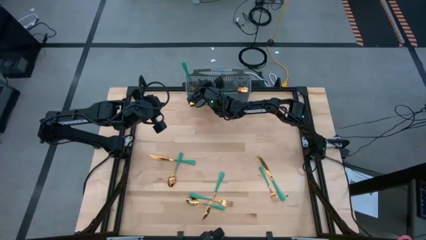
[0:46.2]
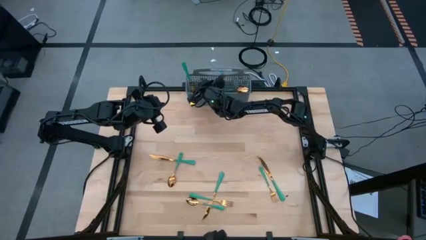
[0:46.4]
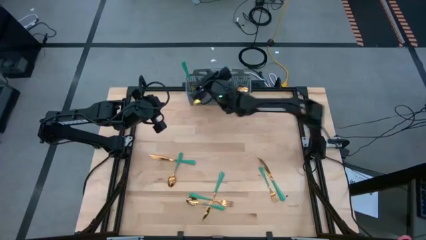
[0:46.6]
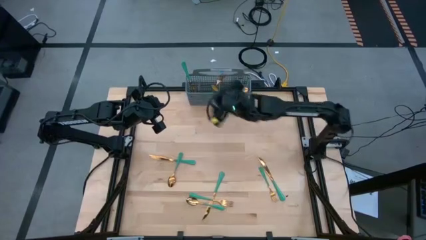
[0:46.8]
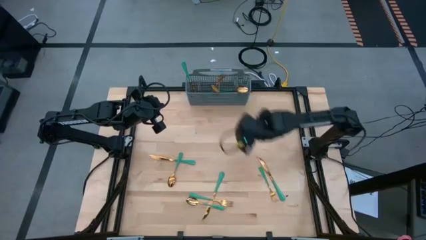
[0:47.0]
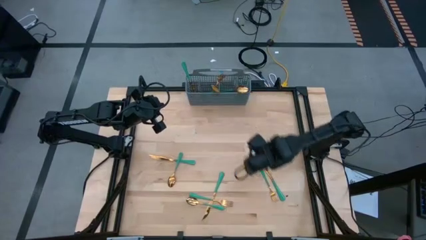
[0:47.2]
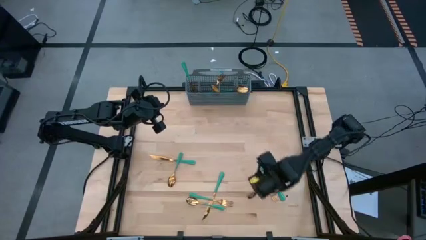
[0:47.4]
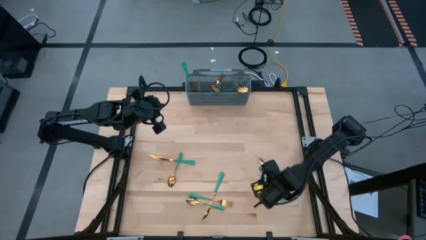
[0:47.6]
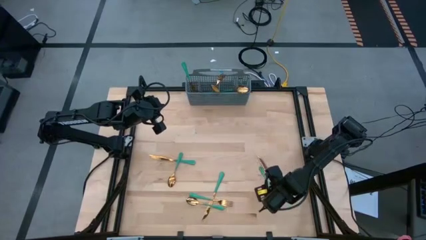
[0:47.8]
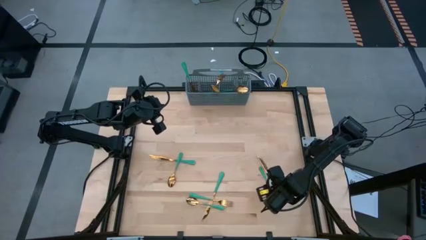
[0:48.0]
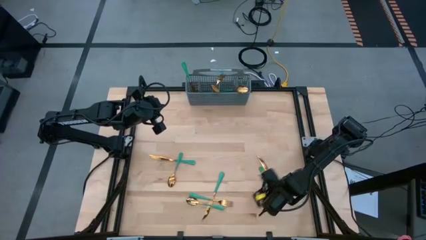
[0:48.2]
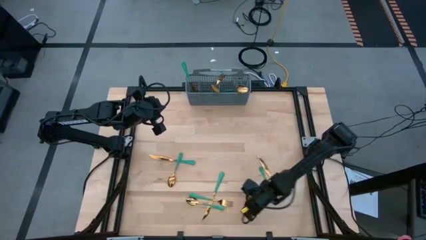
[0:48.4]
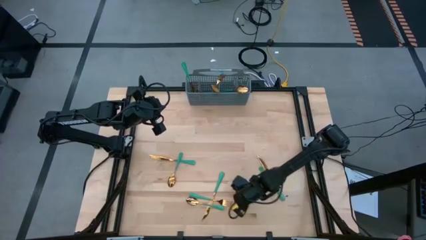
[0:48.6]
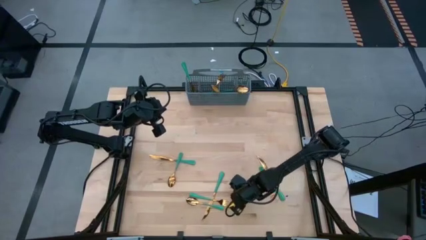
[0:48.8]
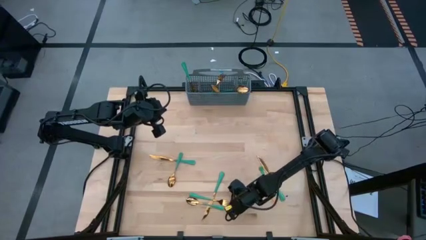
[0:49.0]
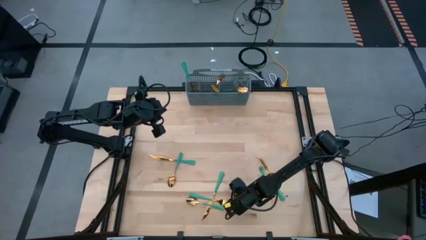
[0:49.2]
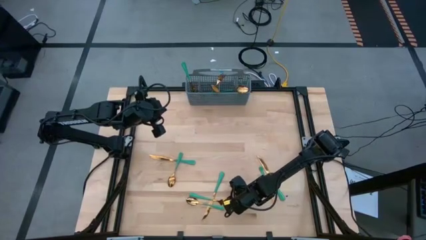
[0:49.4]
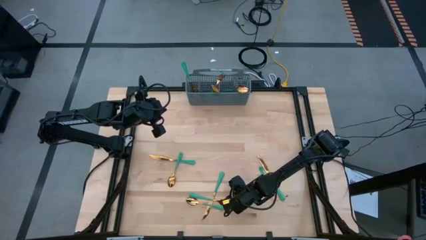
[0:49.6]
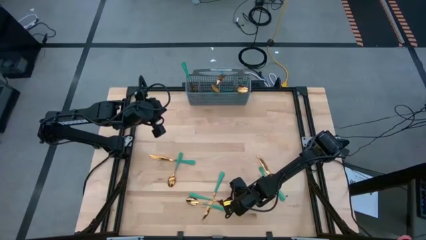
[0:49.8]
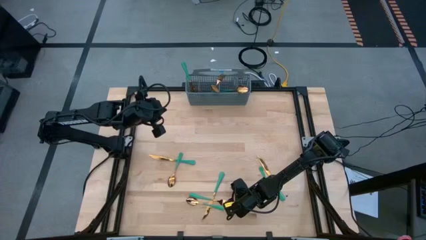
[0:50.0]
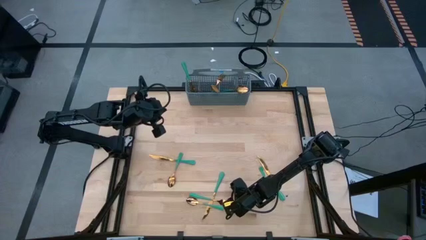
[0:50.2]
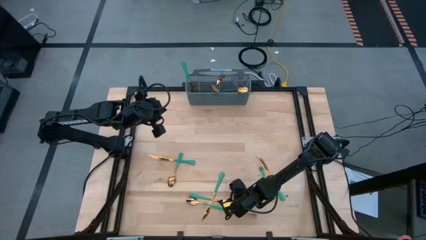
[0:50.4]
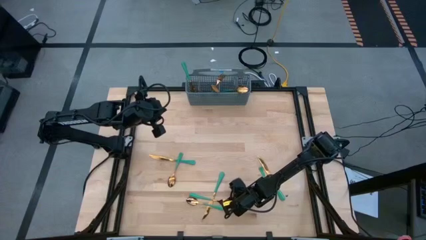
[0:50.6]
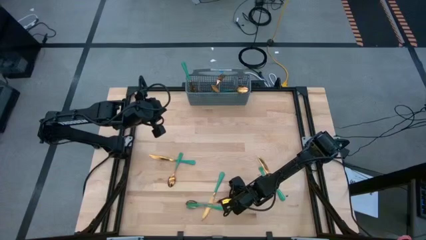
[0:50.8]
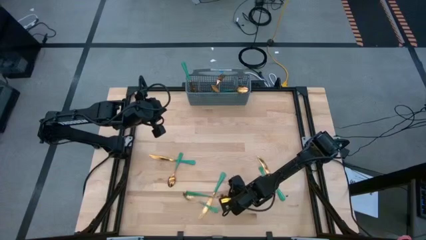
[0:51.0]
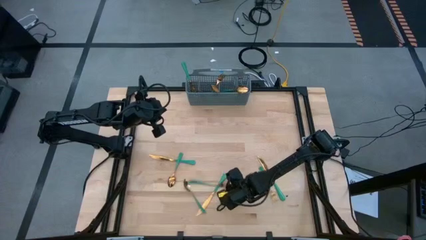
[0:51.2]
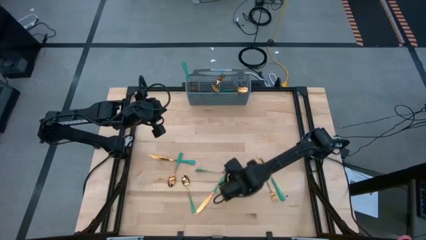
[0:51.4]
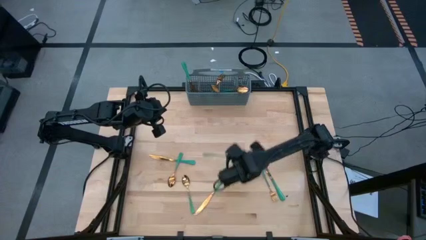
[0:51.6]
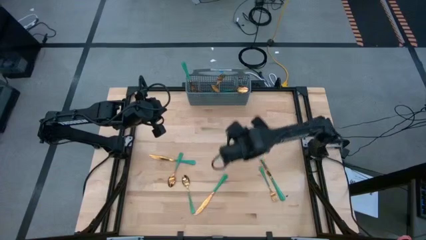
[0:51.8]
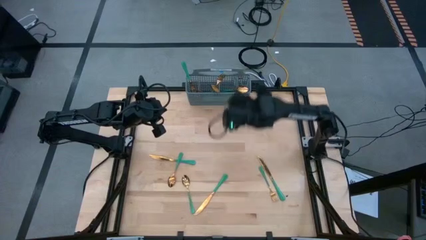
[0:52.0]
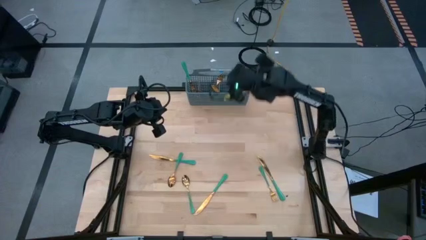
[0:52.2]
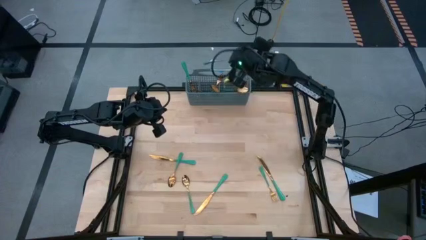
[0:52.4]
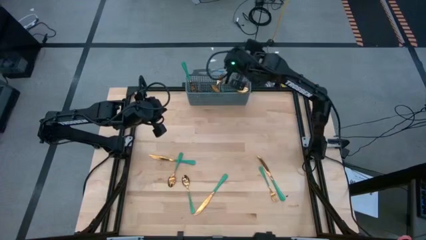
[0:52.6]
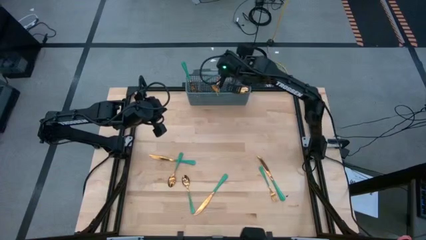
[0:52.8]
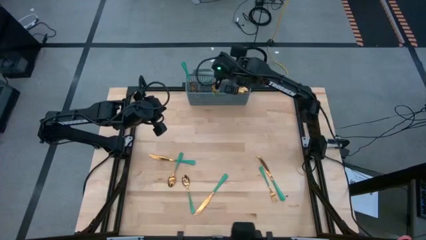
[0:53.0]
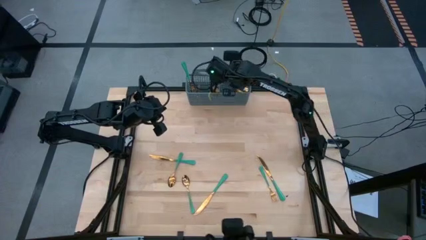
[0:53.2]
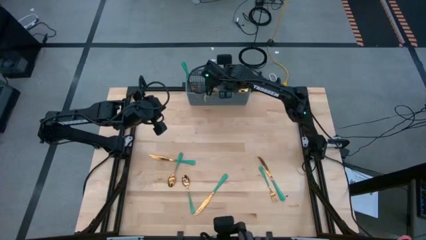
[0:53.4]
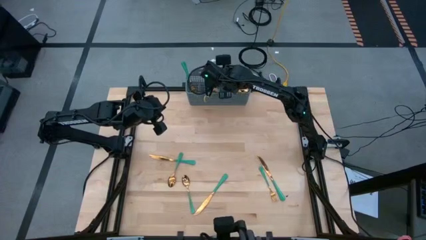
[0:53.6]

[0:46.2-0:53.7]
Task: Sort silverware
Put the green fork into the gray silverware organizer

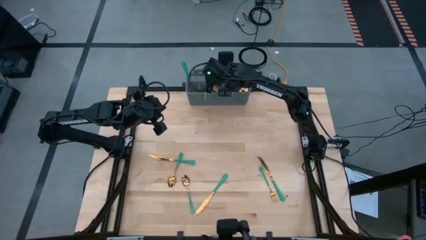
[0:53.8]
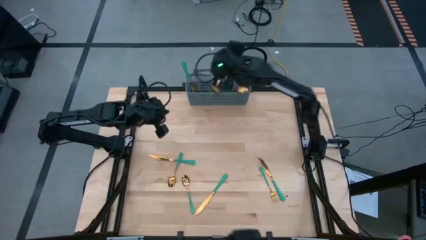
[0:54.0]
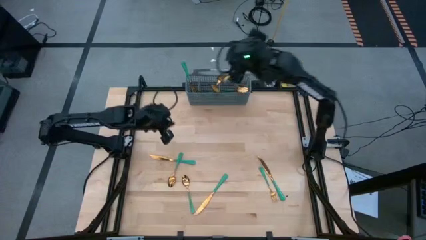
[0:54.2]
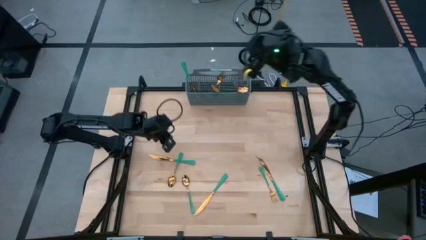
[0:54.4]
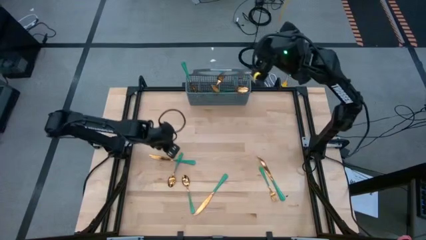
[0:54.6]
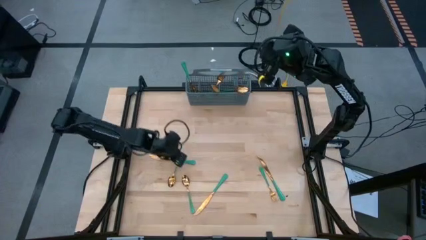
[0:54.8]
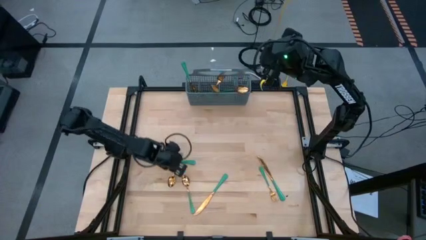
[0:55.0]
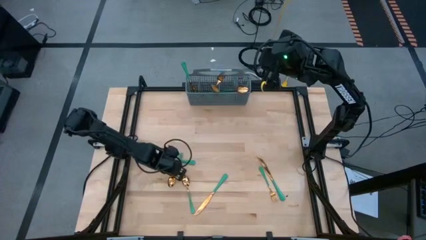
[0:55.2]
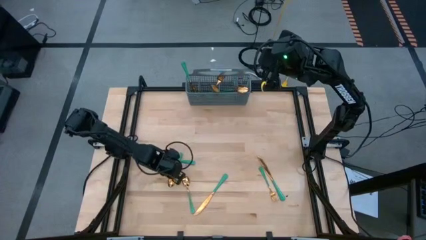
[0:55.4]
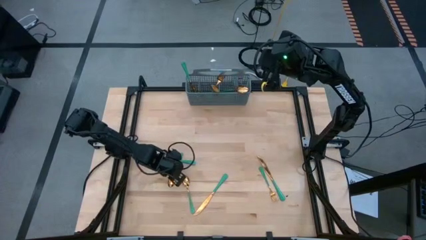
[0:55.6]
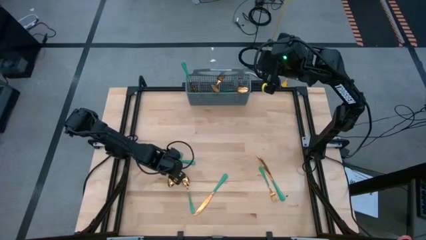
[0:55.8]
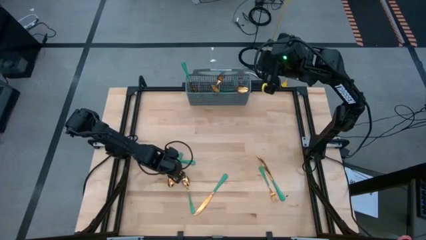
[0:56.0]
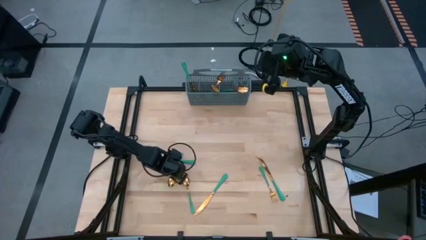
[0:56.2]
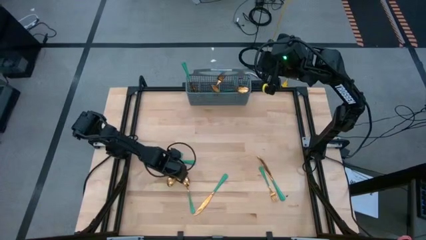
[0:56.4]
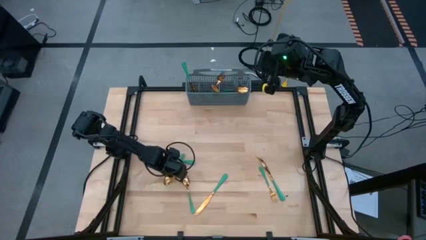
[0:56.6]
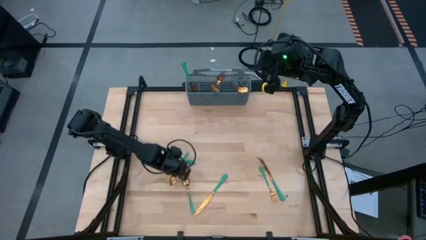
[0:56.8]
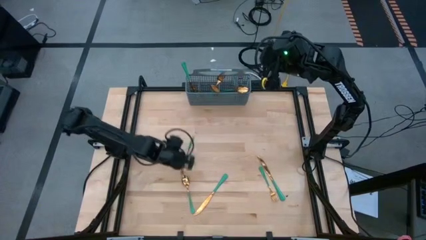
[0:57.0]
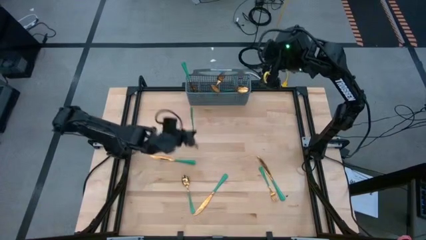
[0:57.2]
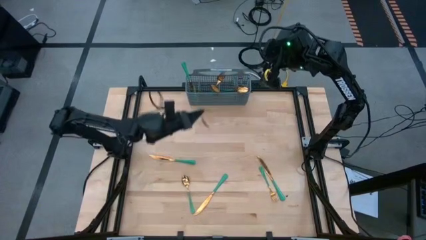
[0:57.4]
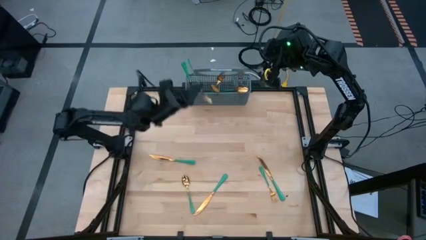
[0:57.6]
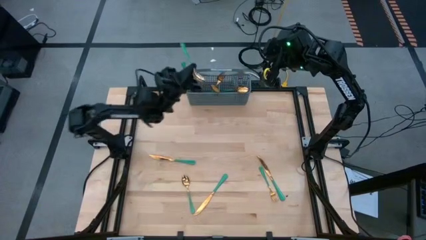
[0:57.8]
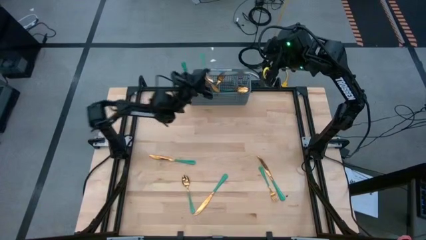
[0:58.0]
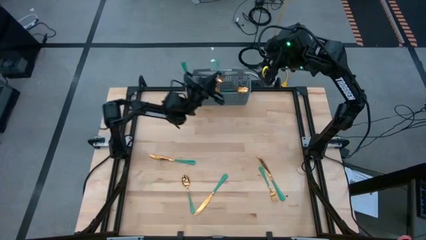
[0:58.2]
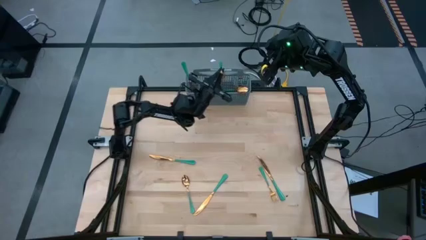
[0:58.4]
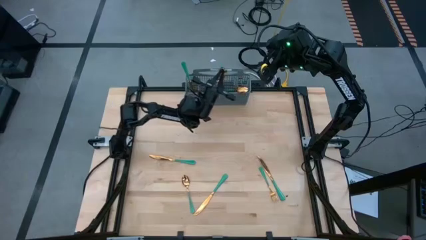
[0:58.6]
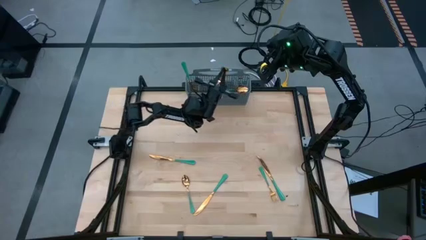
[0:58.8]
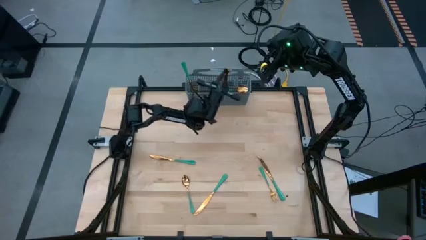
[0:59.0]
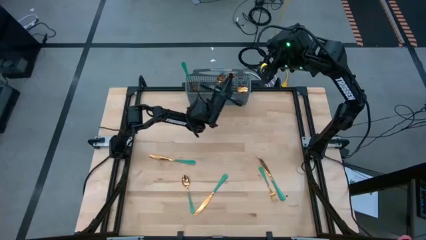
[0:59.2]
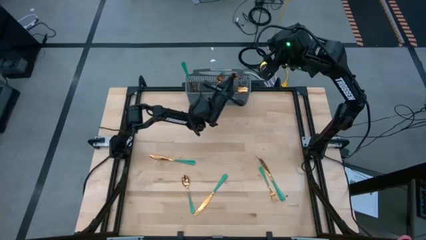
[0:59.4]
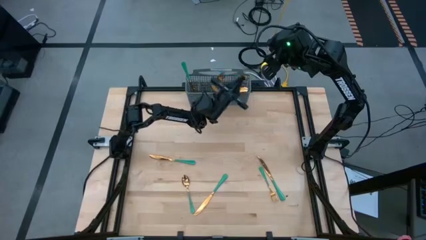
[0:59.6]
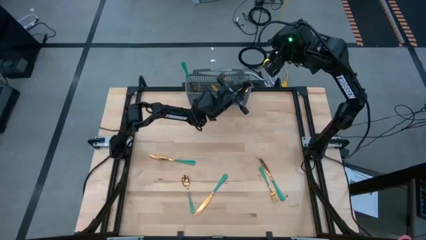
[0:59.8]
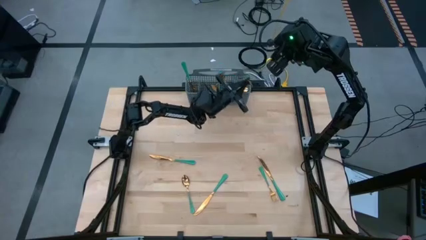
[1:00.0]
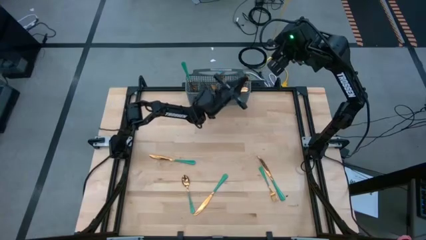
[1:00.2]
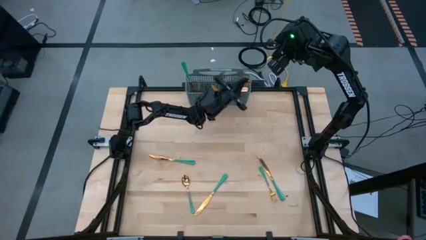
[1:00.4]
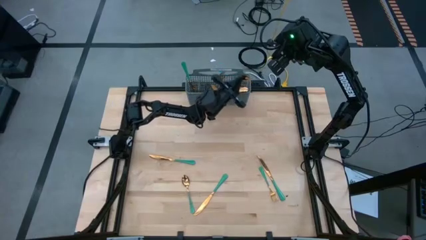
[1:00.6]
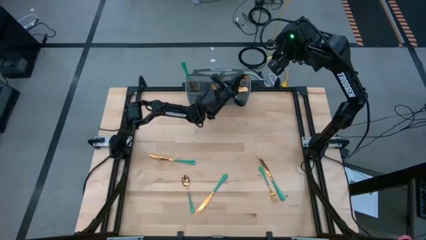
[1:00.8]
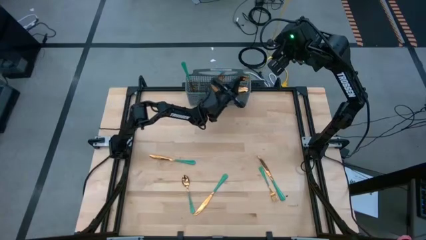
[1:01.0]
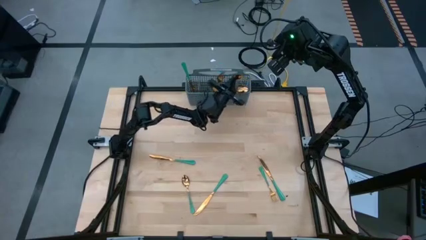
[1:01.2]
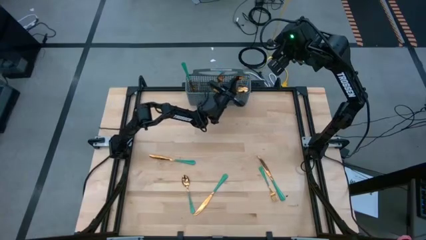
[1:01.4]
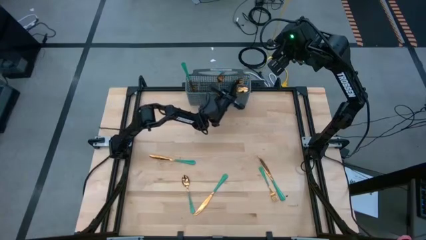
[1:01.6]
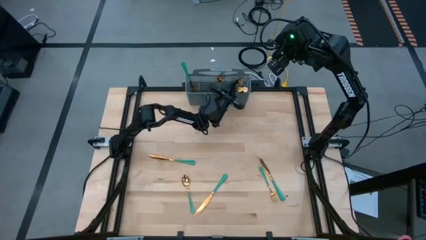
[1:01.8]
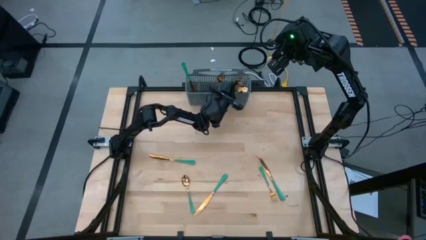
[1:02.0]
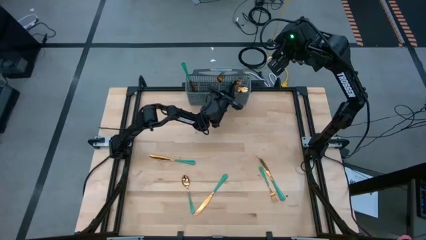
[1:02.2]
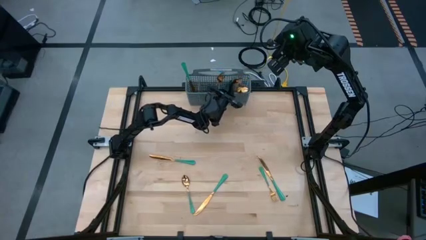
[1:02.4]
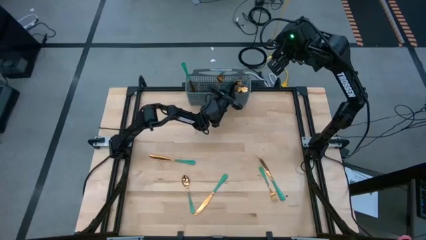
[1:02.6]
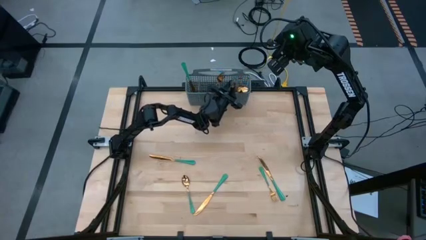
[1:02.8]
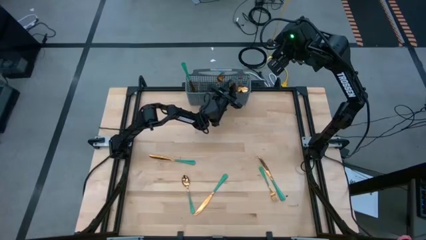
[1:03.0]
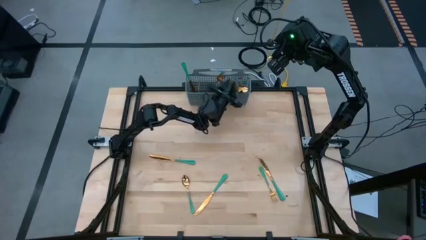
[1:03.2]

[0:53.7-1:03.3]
Put the green spoon into the gray silverware organizer
